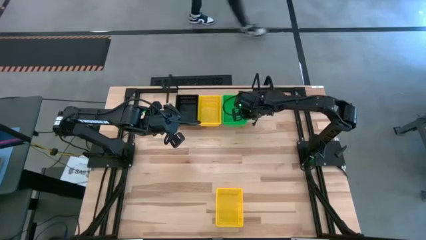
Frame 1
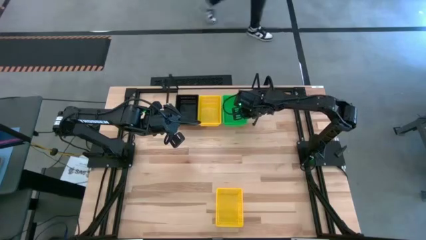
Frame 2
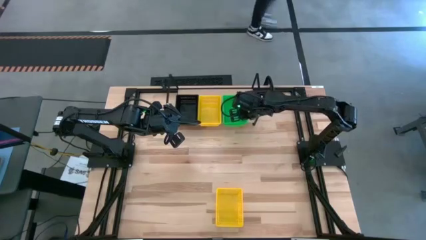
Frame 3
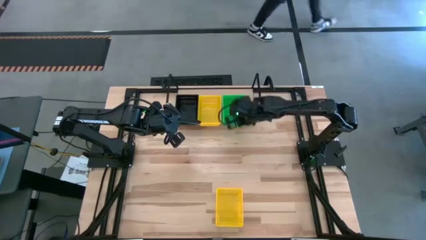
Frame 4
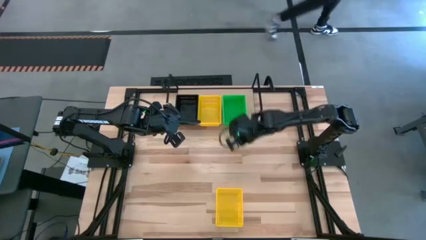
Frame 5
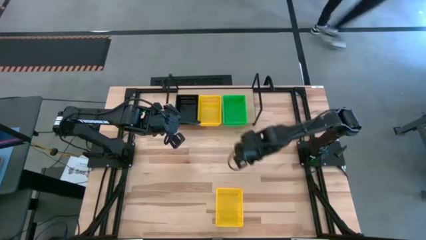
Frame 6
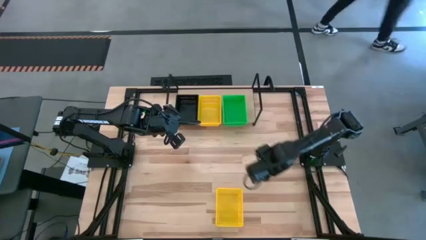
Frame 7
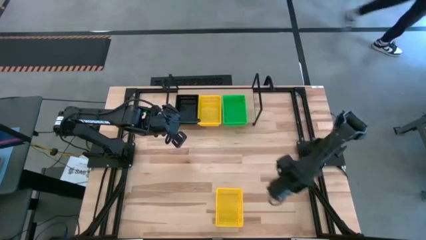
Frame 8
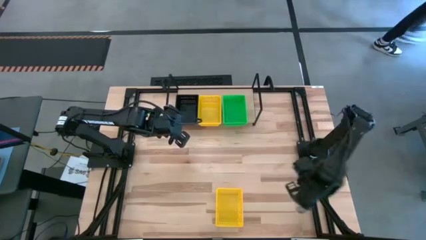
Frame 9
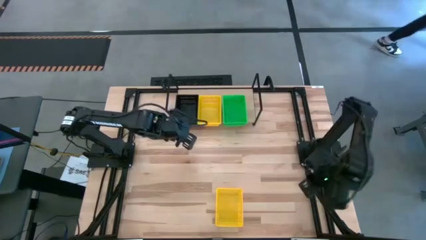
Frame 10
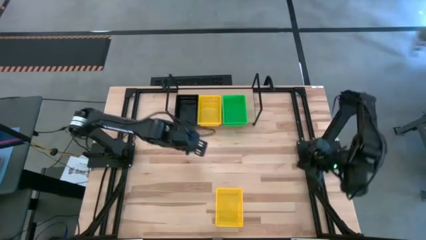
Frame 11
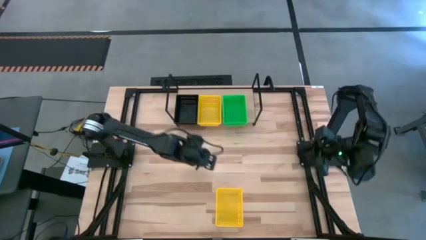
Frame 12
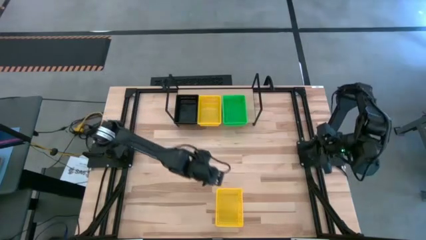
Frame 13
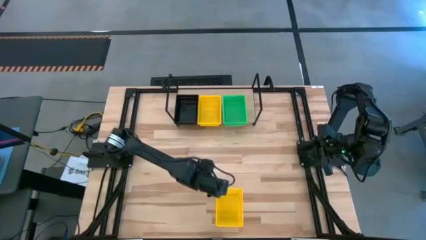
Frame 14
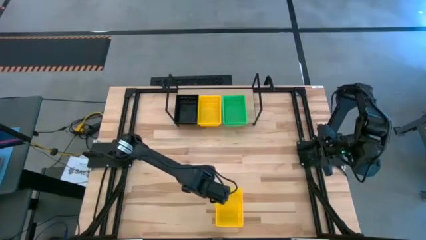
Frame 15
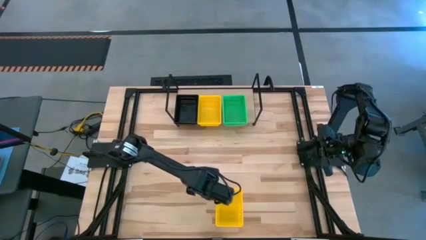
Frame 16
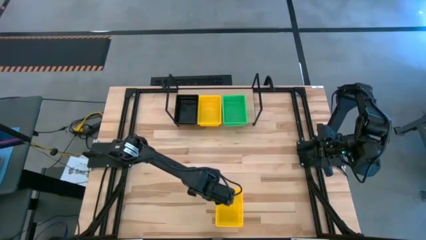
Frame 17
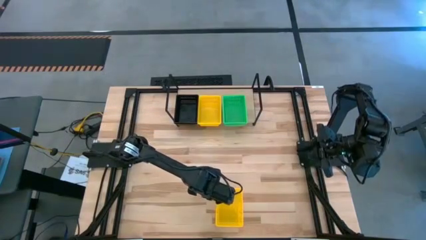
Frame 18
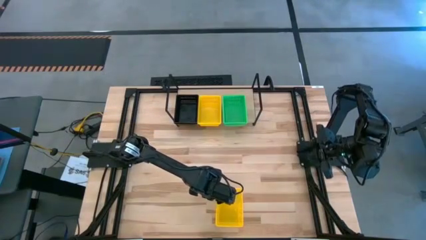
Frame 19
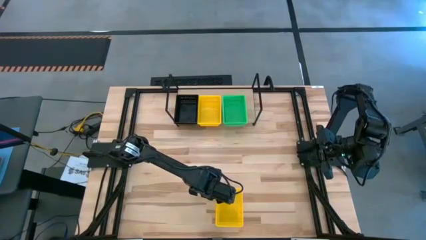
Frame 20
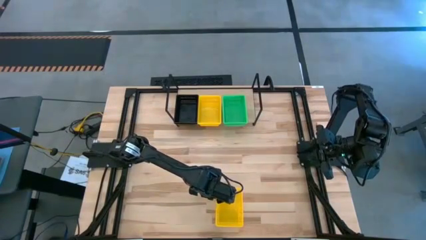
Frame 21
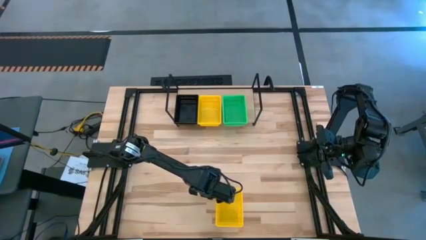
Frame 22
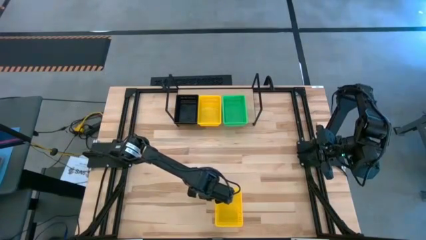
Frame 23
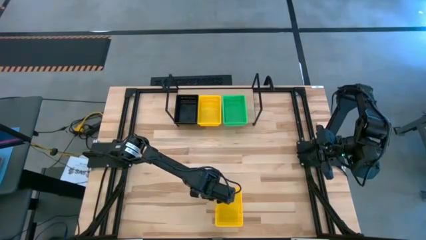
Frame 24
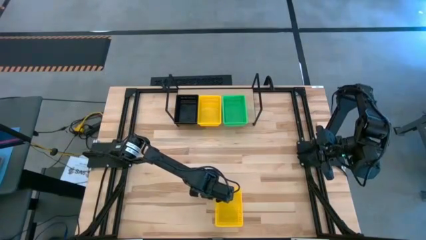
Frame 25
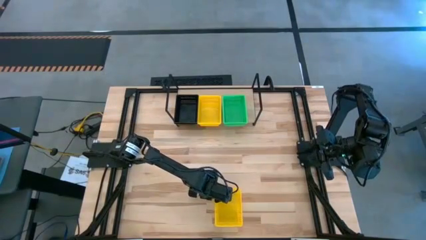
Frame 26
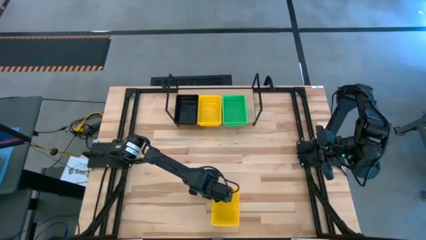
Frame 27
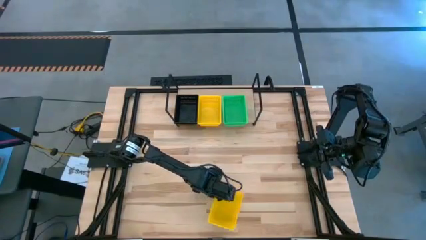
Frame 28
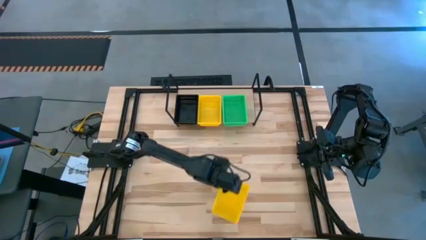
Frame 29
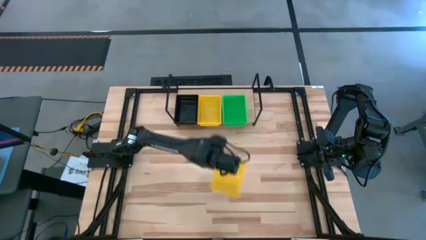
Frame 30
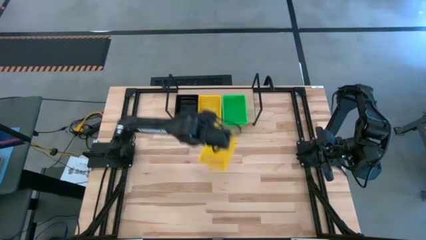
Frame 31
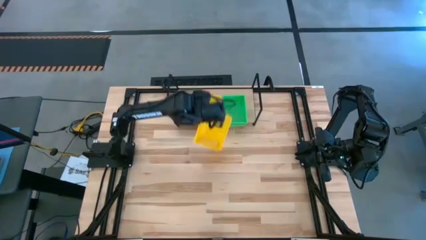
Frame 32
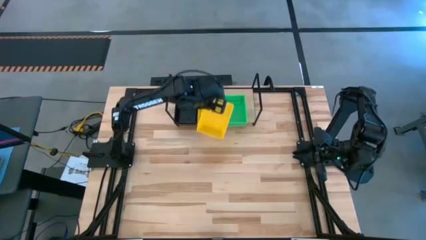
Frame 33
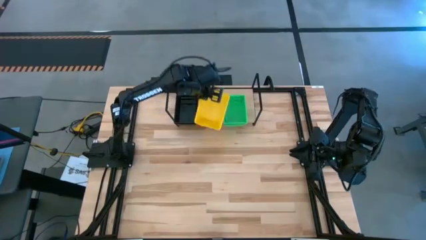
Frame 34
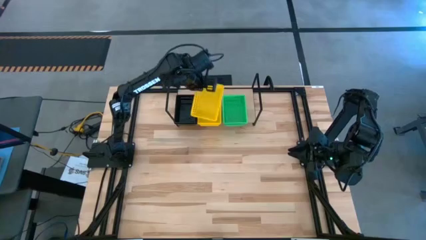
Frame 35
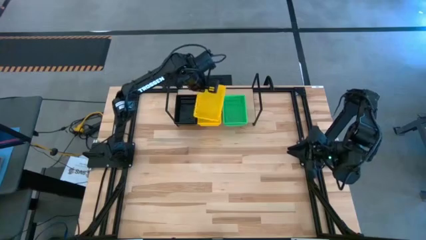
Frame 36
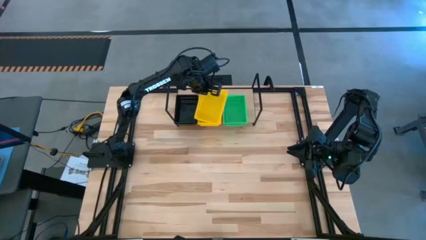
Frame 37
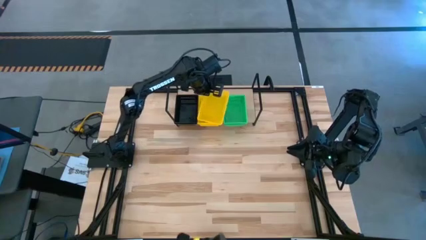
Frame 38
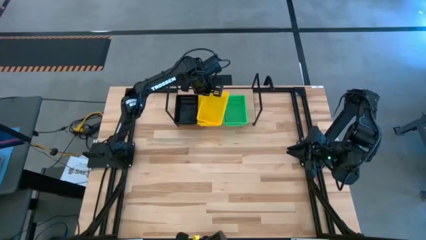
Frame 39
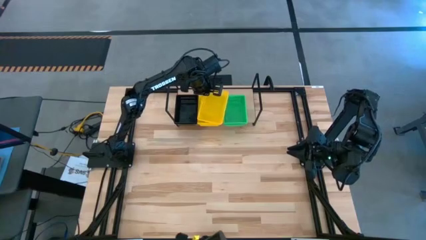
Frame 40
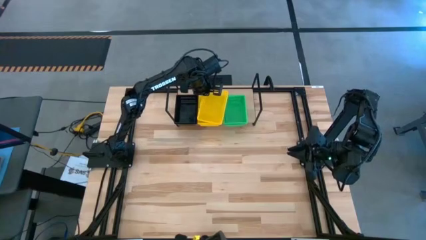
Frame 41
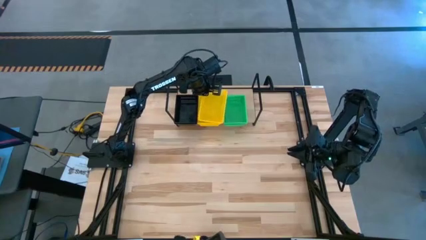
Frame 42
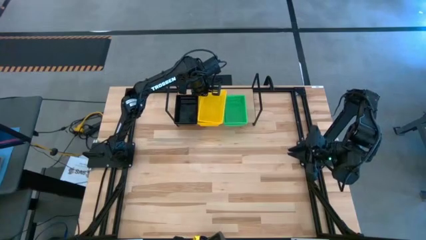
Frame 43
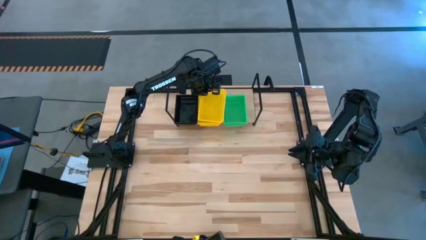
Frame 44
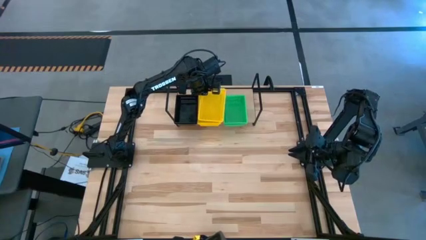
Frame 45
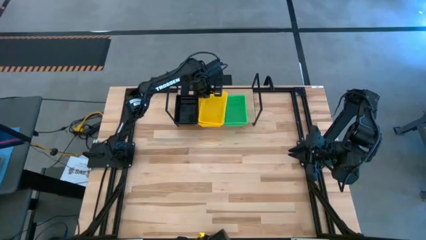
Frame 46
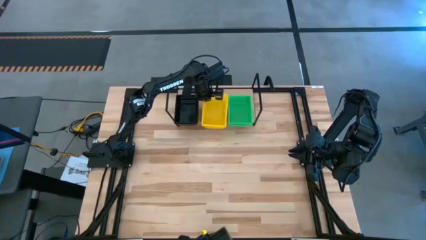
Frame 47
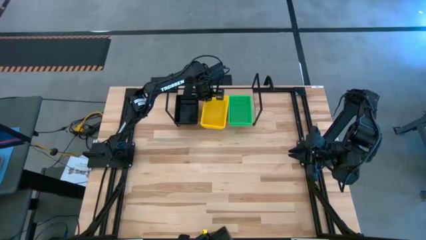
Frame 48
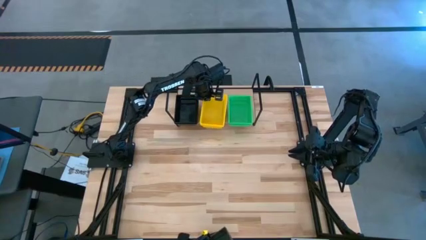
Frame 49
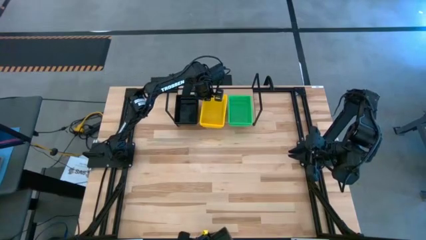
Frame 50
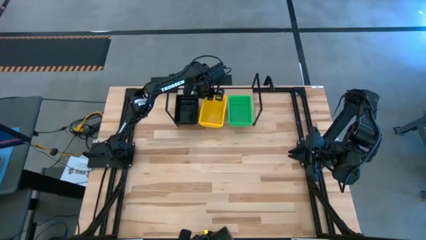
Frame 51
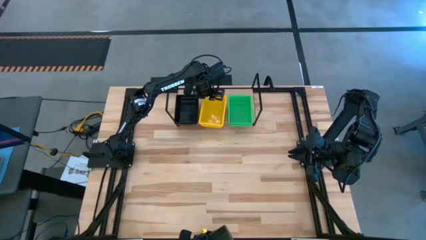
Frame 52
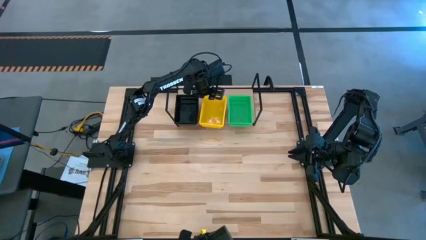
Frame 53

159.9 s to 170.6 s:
Task: Stack baskets on shelf by color
Stack the yellow bin on top of the stacked yellow bins on the shelf

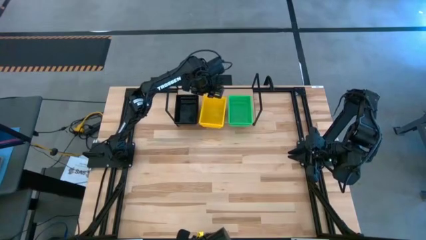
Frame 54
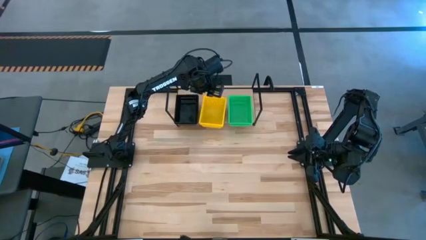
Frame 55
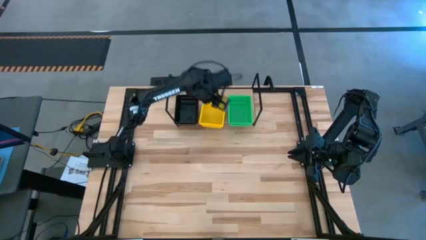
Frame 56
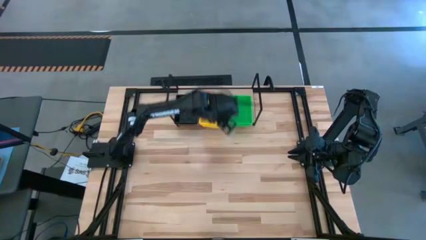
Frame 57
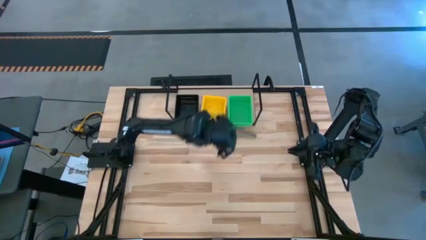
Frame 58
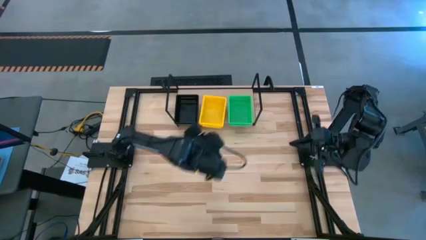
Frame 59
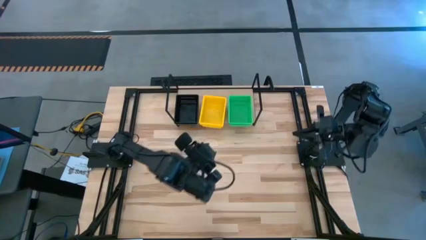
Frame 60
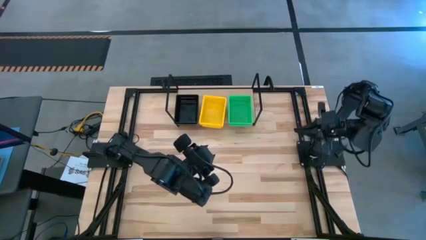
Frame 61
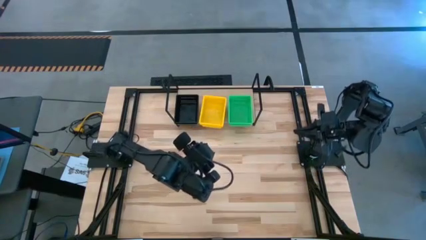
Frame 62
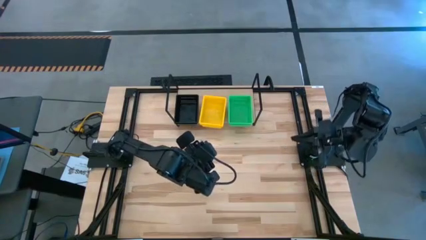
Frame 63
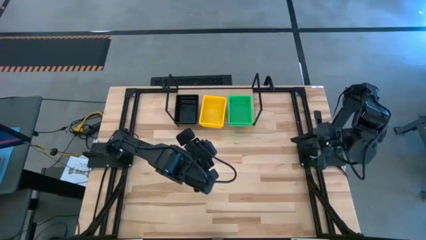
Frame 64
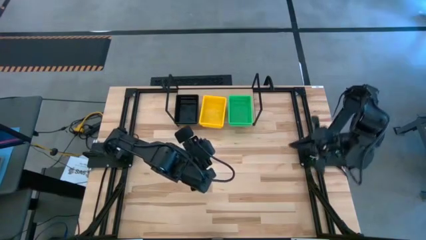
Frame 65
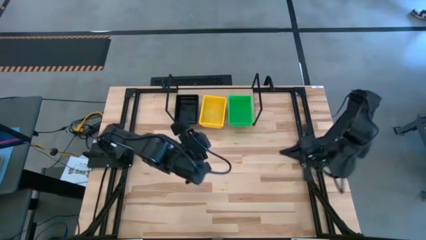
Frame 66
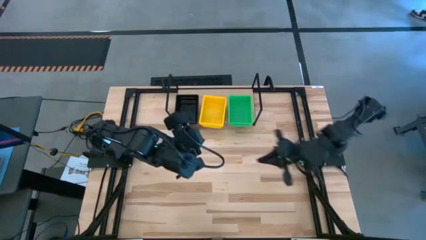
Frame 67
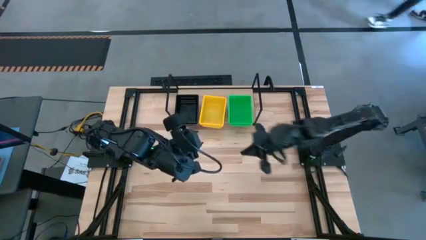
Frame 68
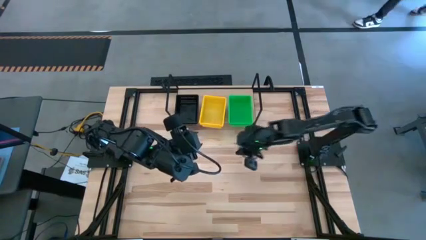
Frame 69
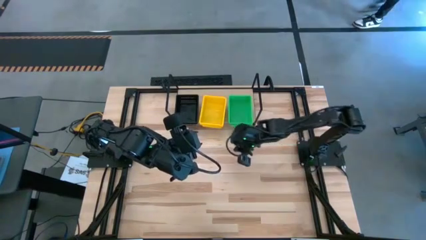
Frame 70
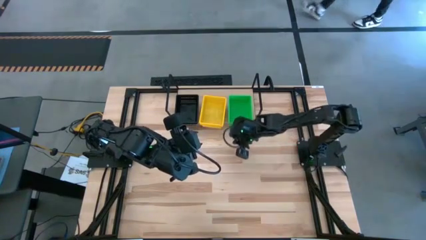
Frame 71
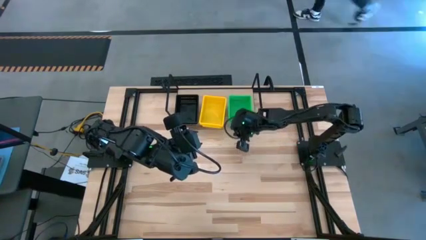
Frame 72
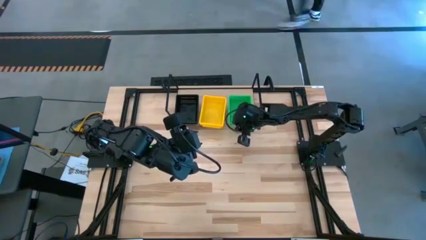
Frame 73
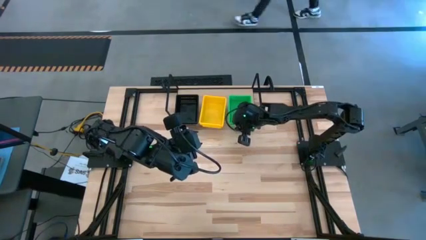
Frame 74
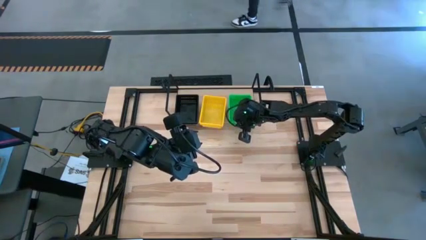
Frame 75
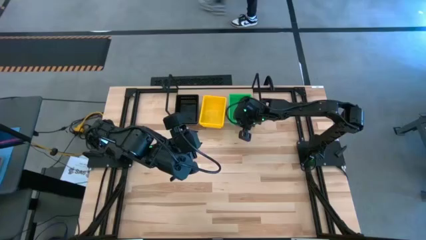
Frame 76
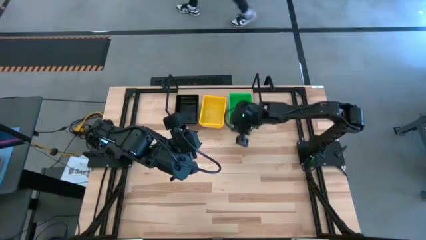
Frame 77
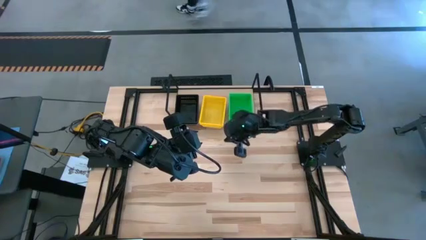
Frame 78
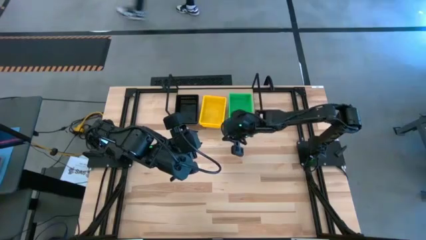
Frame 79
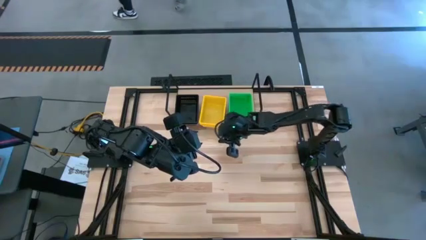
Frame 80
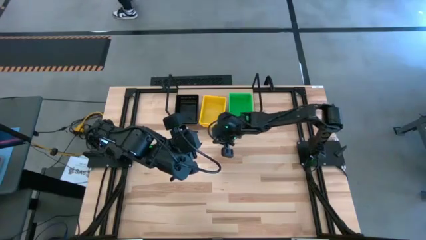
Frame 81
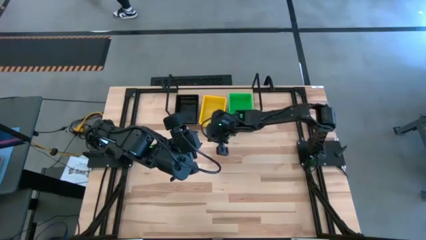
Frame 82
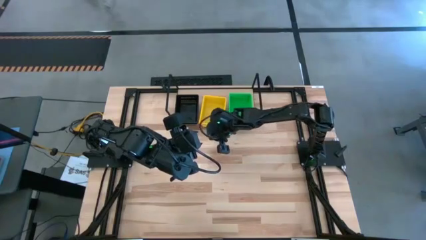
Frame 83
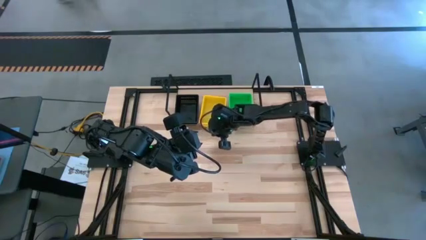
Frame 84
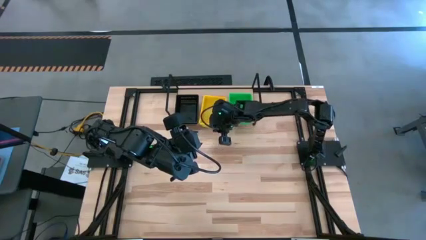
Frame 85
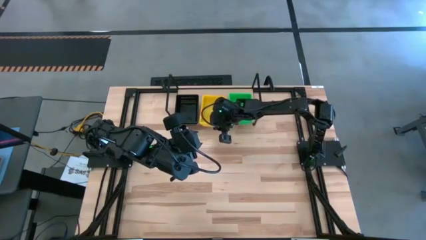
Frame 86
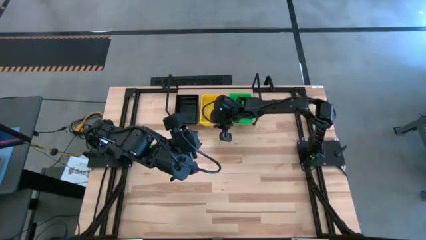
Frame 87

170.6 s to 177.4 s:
Adjust the stacked bins on the shelf
